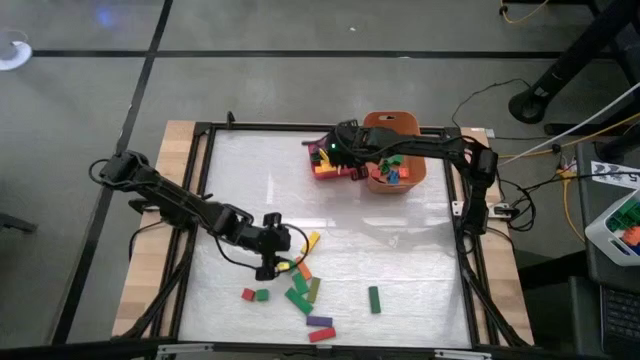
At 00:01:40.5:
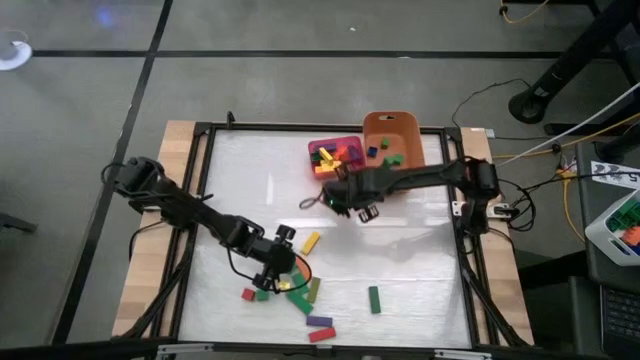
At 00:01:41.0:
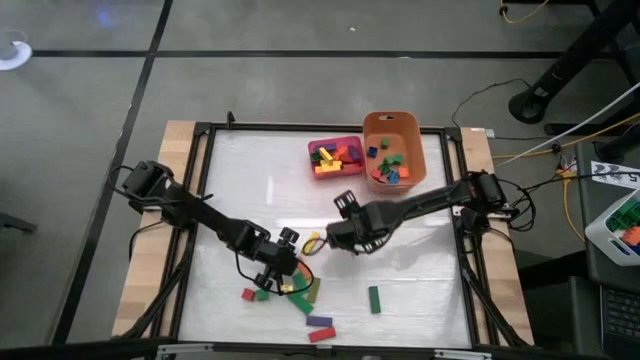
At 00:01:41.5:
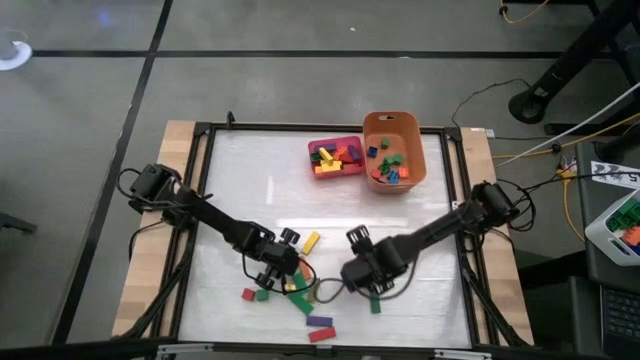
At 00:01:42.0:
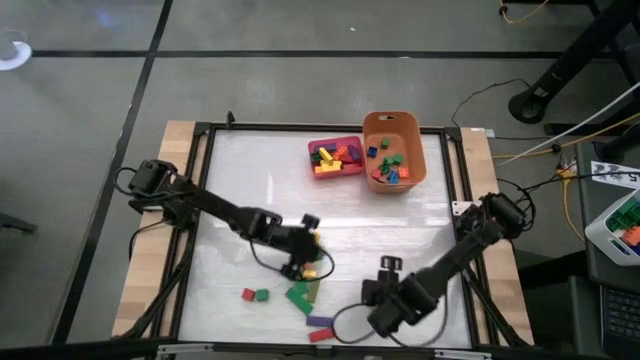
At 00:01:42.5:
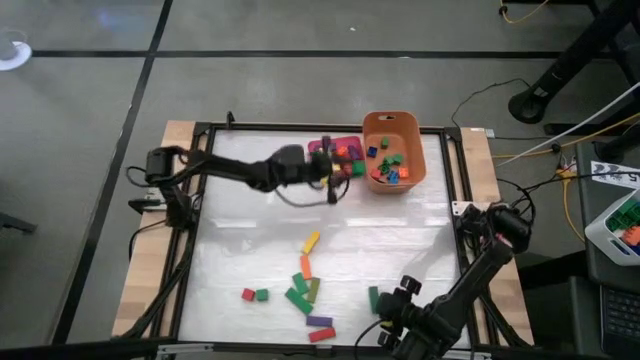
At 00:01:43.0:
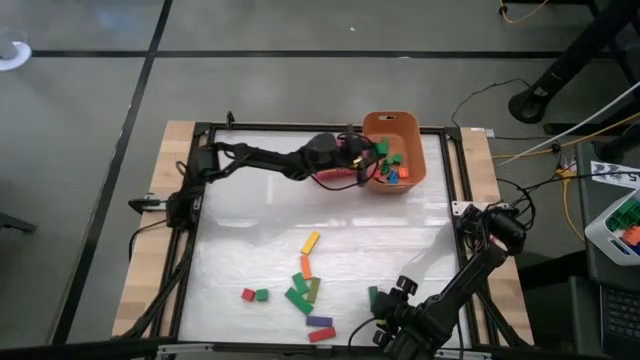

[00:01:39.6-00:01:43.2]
Task: Sort blocks by size
Put the small green block into the orange bin

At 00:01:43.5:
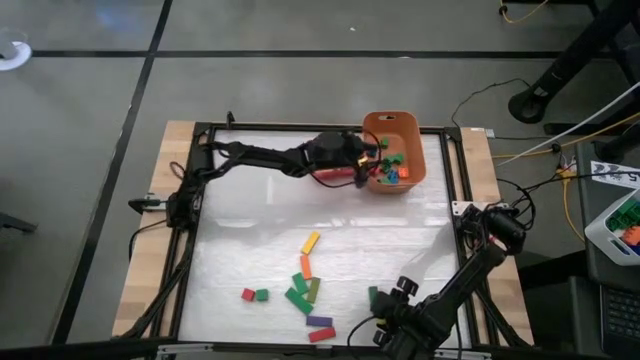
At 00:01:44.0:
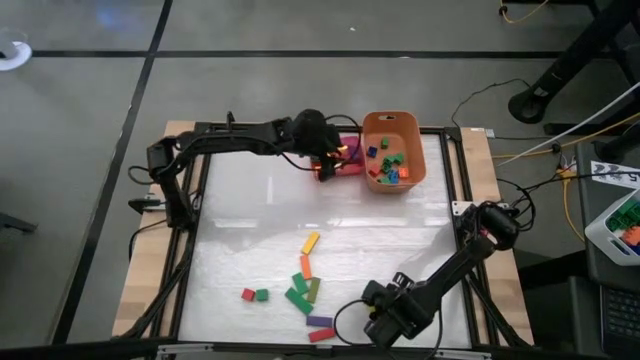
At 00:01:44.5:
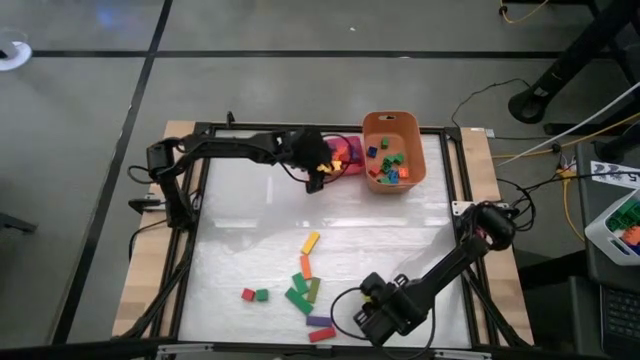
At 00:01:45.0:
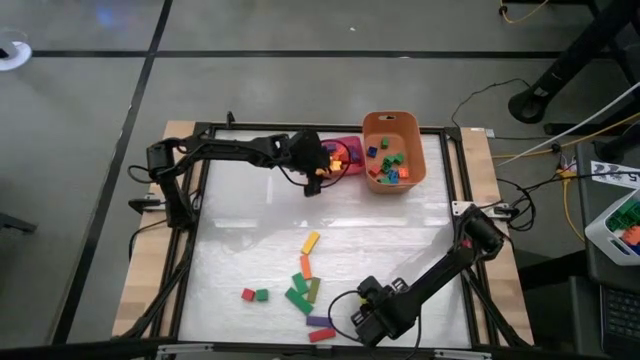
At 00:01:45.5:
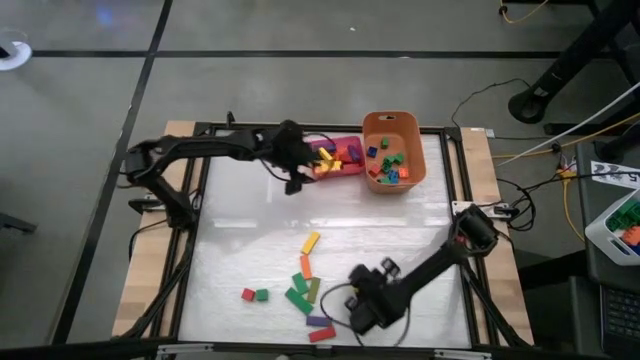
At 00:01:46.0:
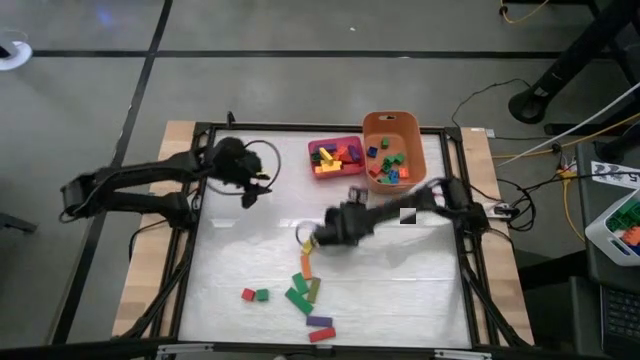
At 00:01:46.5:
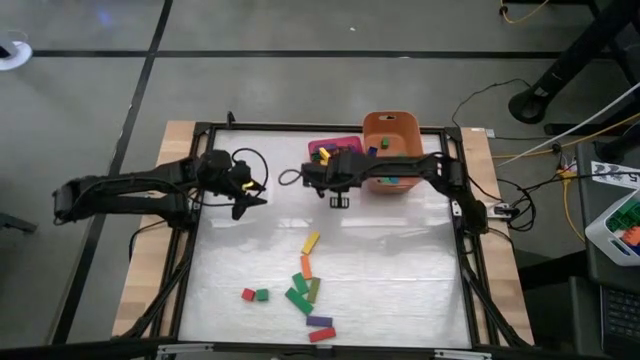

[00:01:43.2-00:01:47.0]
Put the large green block into the pink bin

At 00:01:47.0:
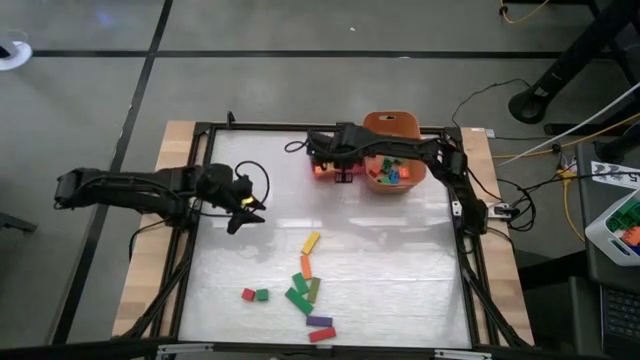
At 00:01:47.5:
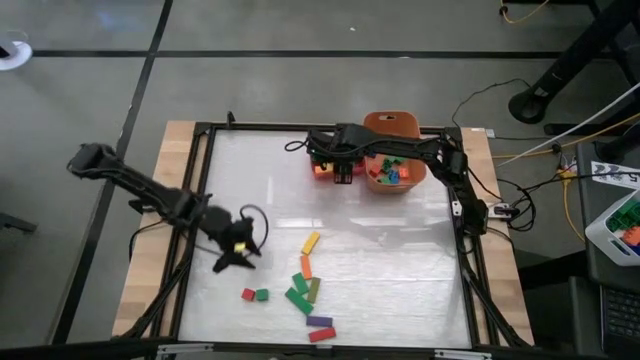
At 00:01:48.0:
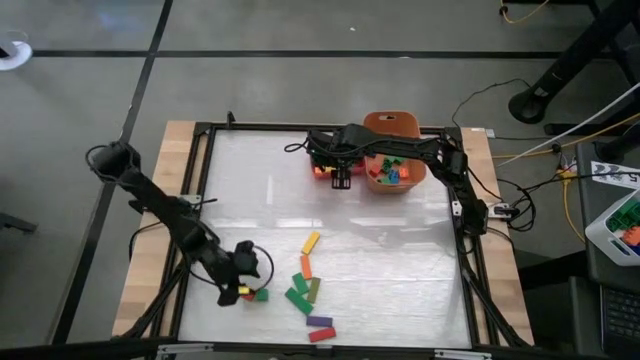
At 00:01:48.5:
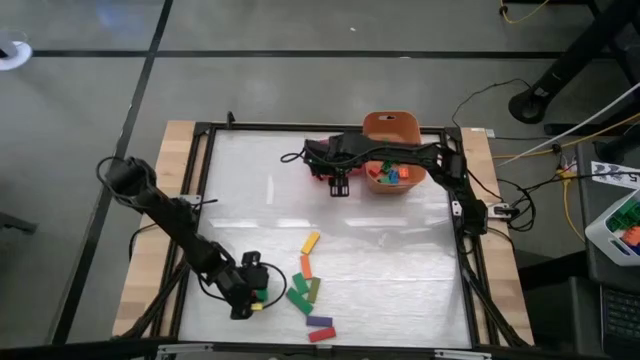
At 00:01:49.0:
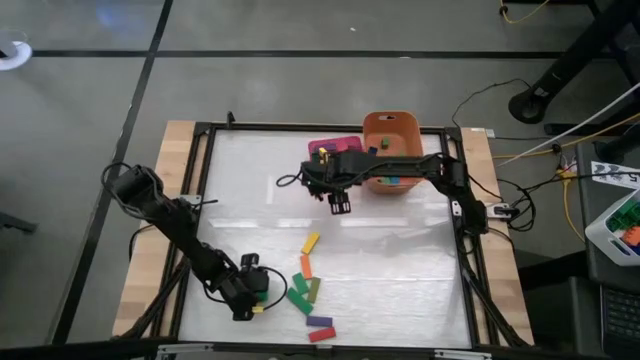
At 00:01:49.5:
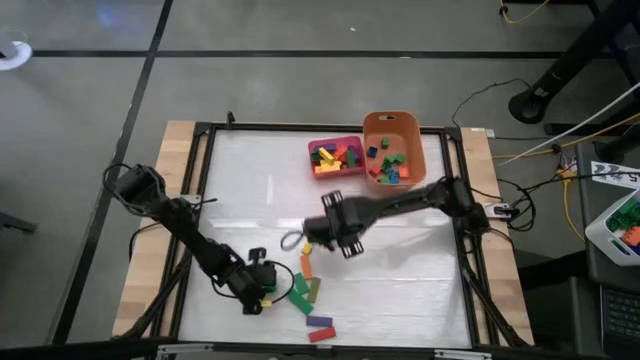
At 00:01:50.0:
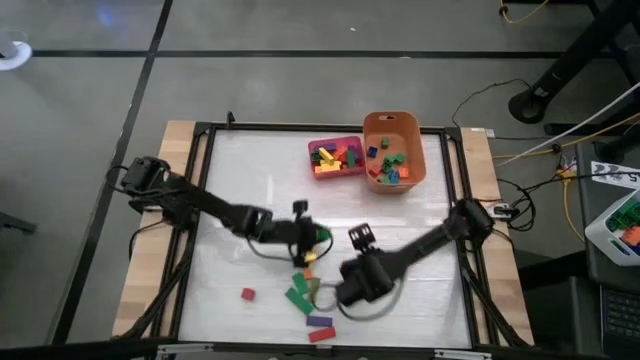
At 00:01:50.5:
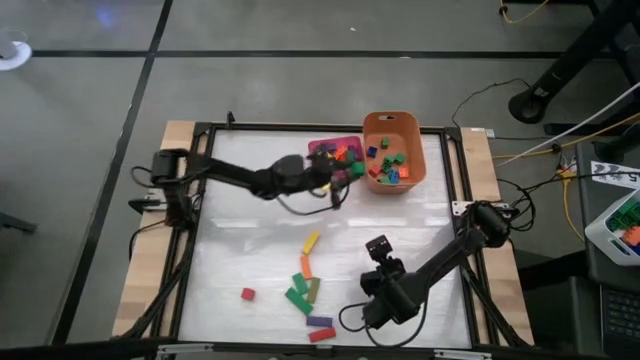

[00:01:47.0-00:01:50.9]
Put the small green block into the orange bin

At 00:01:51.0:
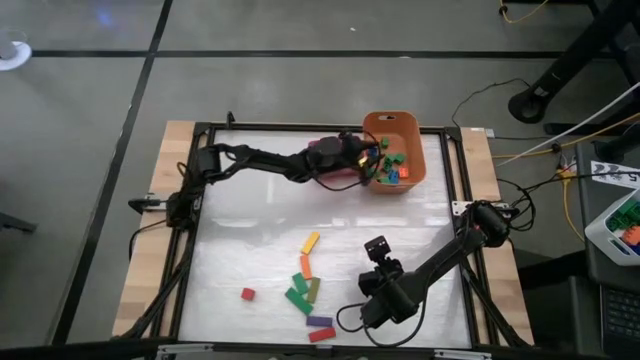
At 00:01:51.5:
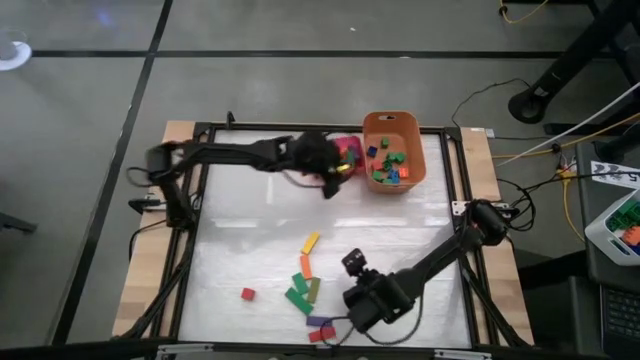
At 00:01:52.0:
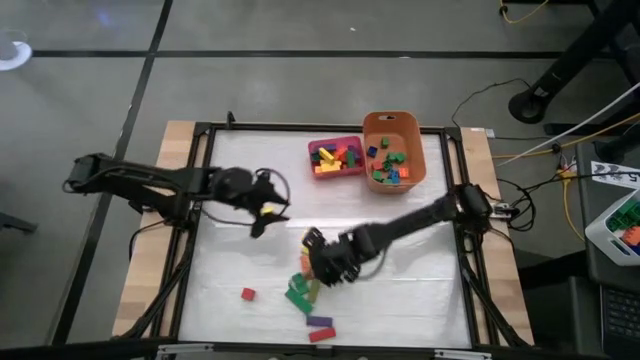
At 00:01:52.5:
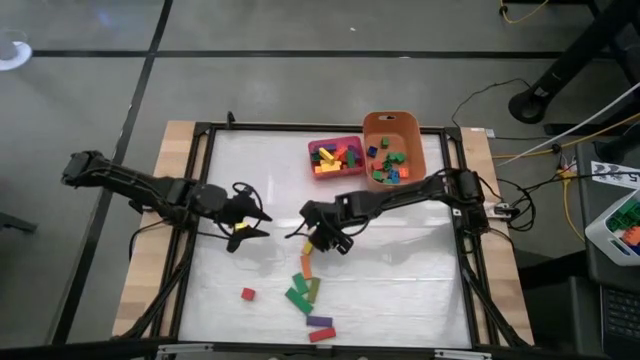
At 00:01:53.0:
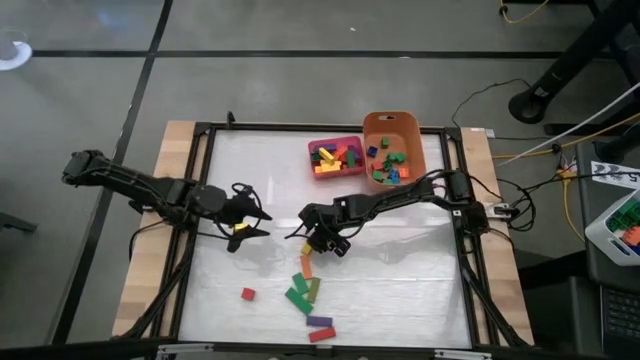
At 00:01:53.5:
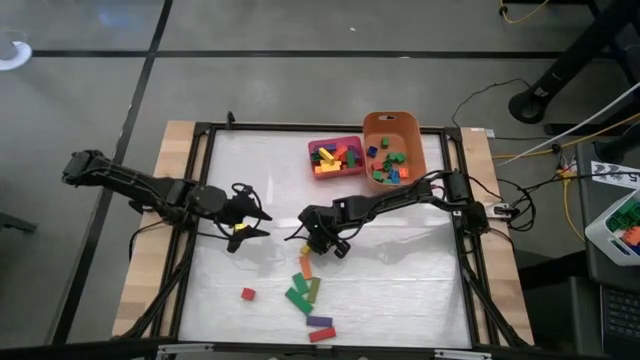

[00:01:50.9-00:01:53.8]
Put the large yellow block into the pink bin

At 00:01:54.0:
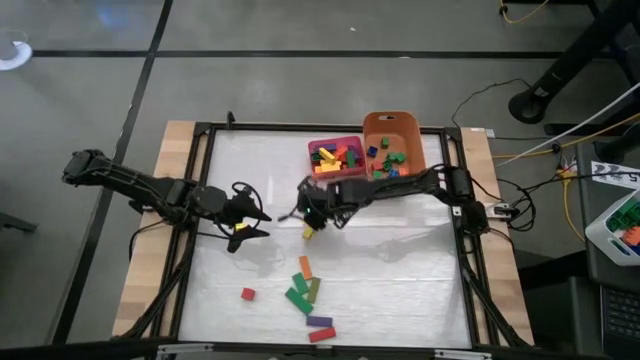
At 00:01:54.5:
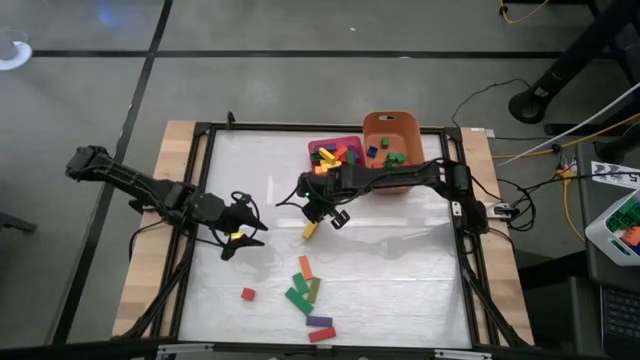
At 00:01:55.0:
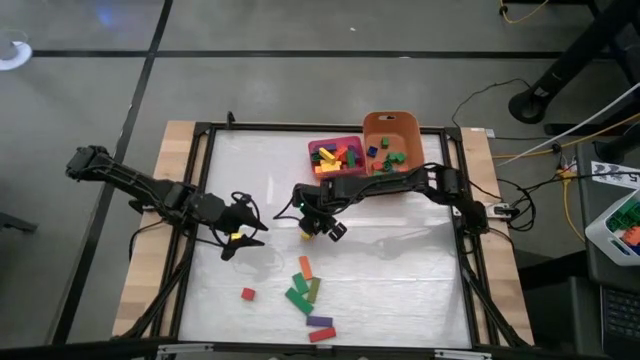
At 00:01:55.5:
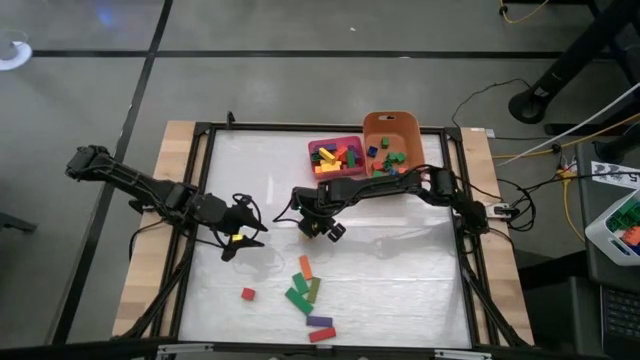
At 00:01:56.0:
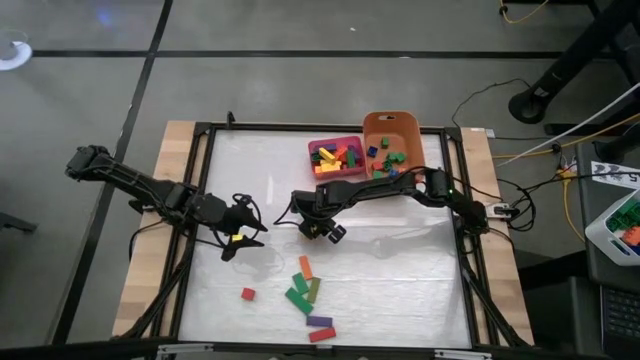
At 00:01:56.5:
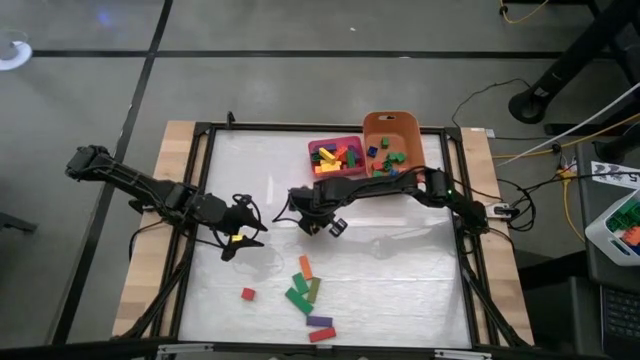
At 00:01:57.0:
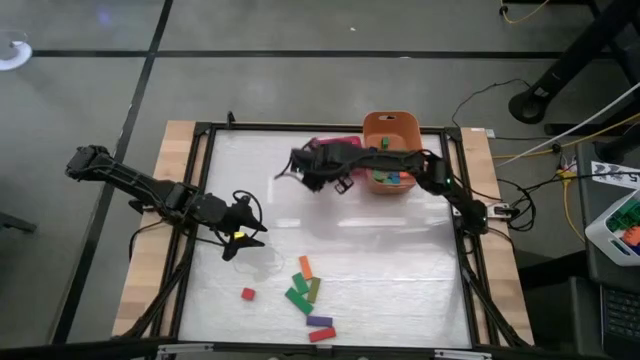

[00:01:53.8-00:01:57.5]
Put the large yellow block into the pink bin

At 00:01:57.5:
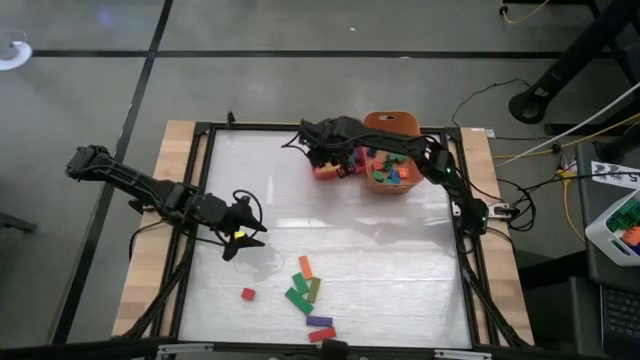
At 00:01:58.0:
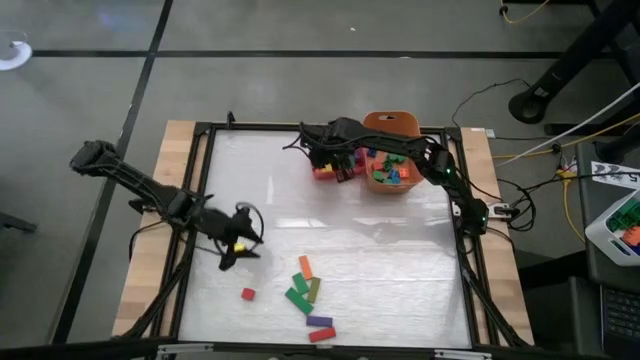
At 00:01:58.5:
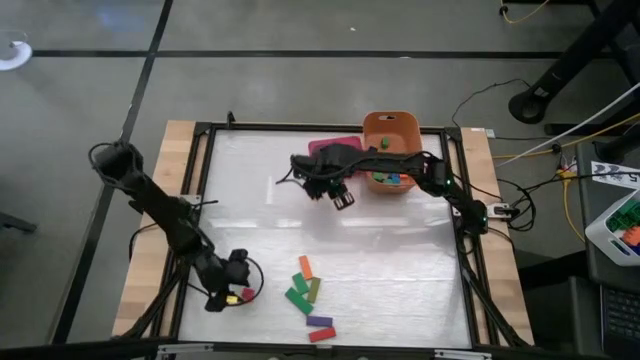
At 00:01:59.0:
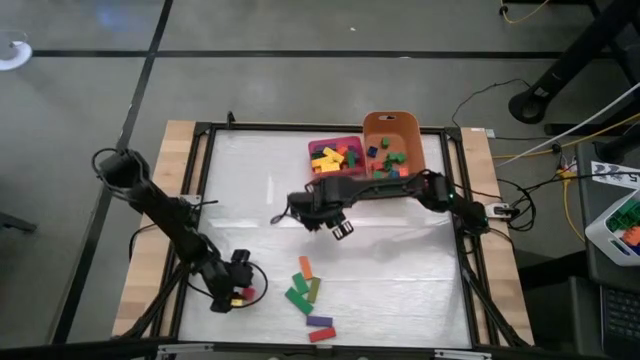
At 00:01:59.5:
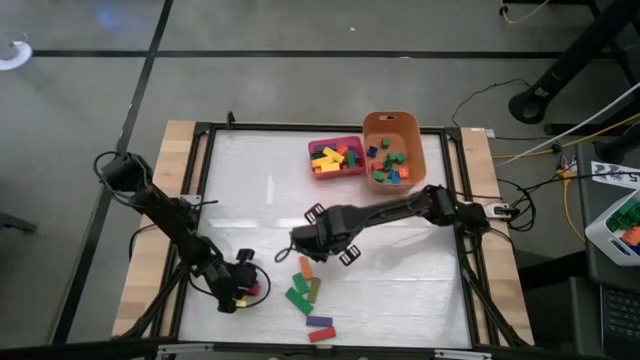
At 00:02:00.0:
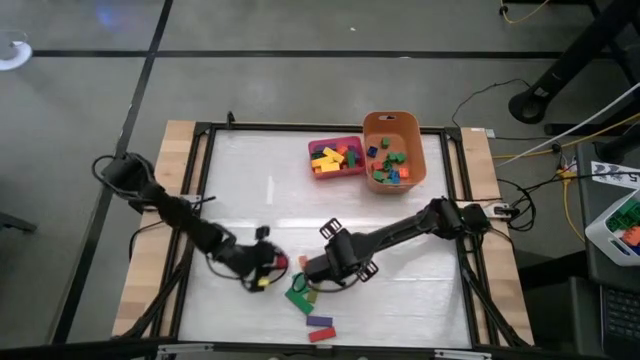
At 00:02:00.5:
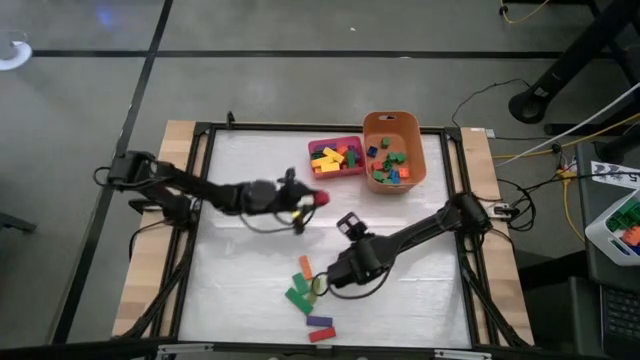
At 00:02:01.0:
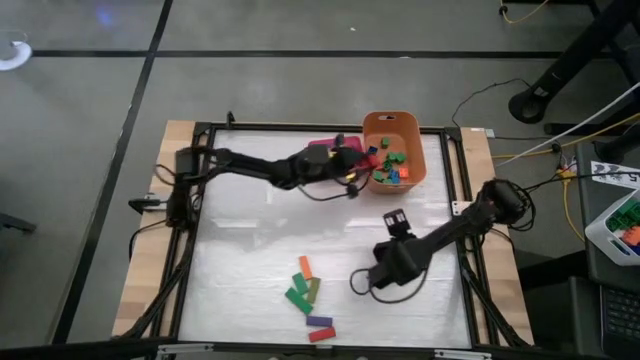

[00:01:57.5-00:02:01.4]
Put the small red block into the orange bin
